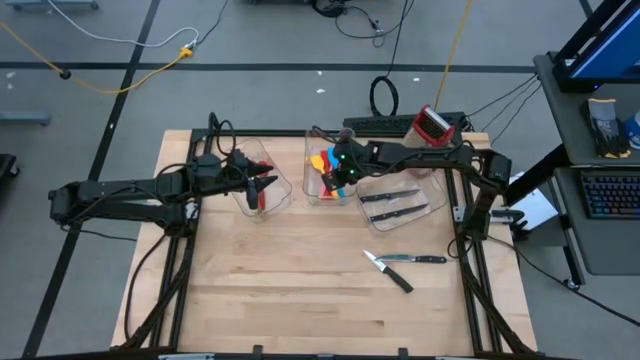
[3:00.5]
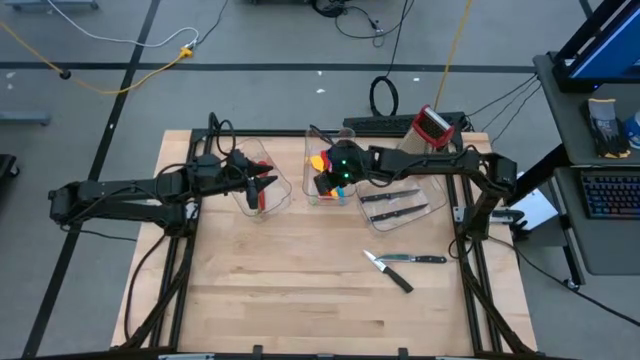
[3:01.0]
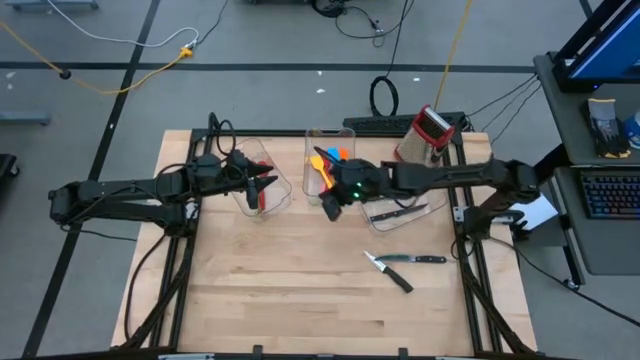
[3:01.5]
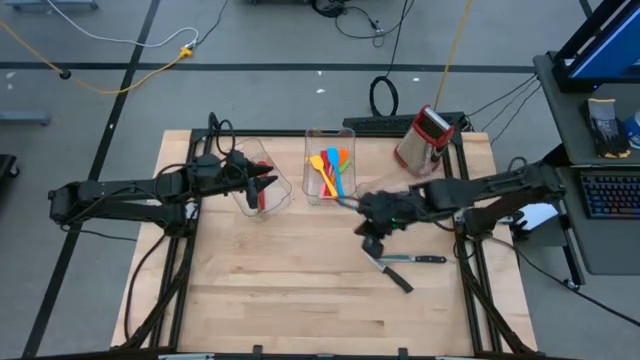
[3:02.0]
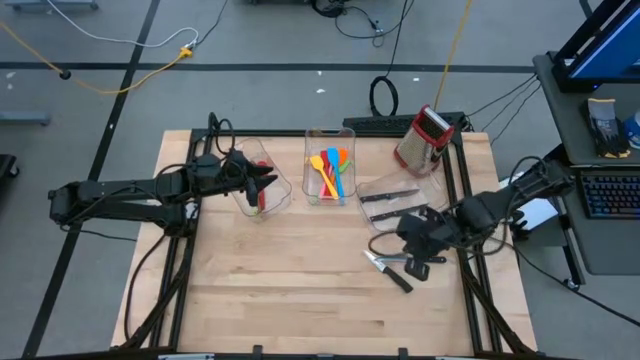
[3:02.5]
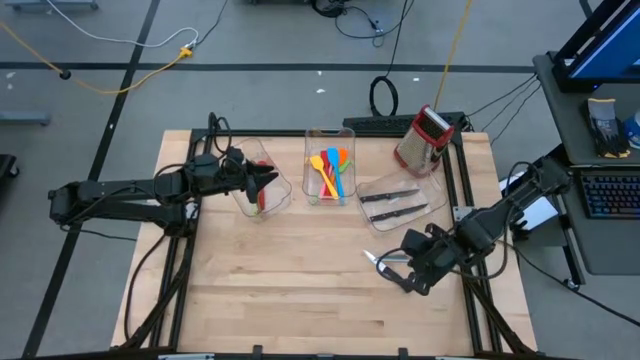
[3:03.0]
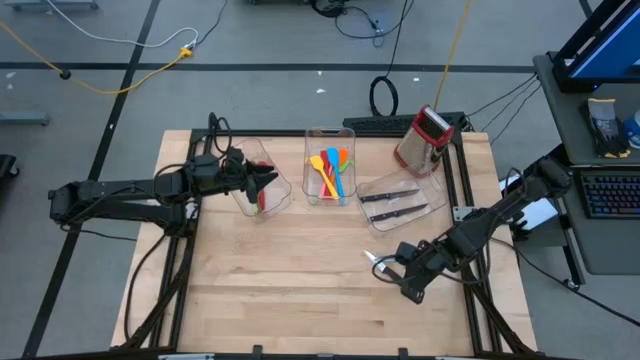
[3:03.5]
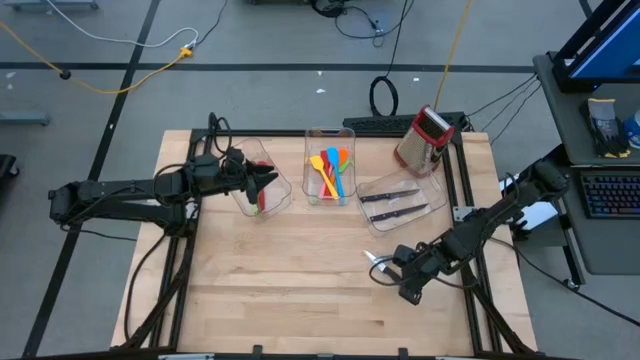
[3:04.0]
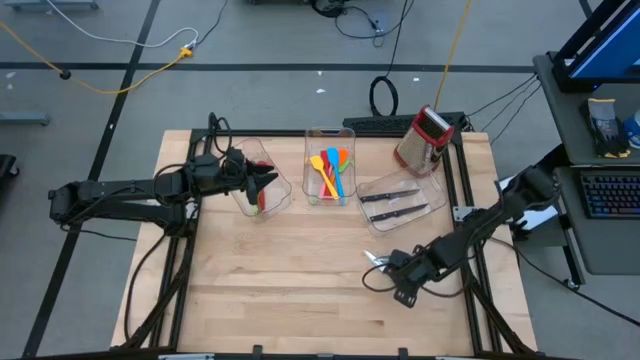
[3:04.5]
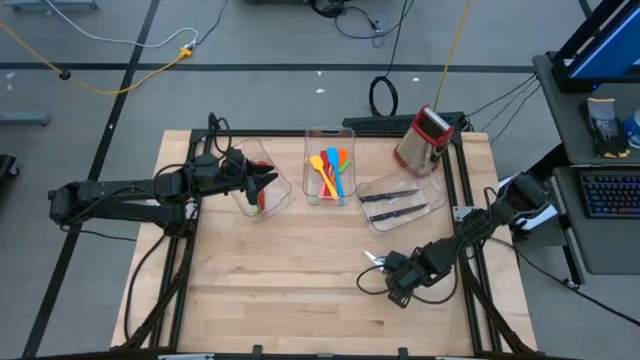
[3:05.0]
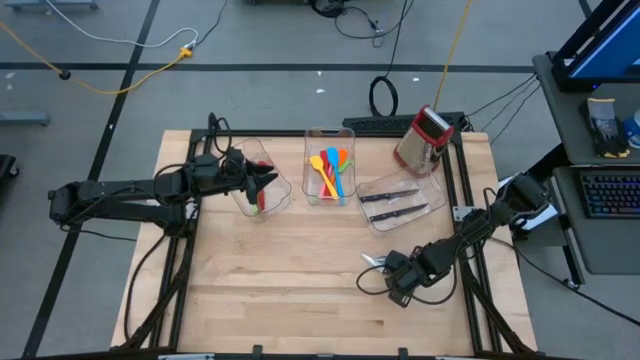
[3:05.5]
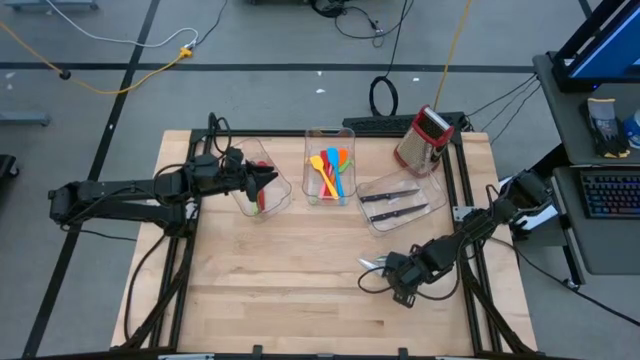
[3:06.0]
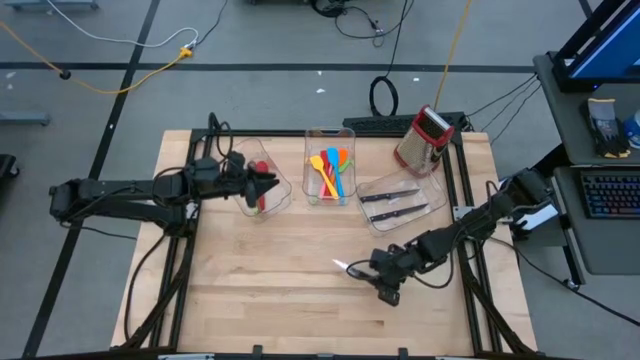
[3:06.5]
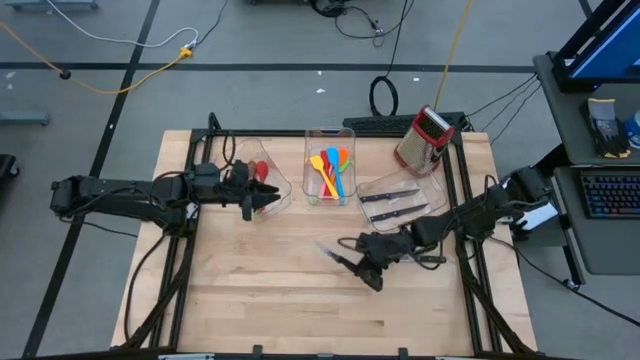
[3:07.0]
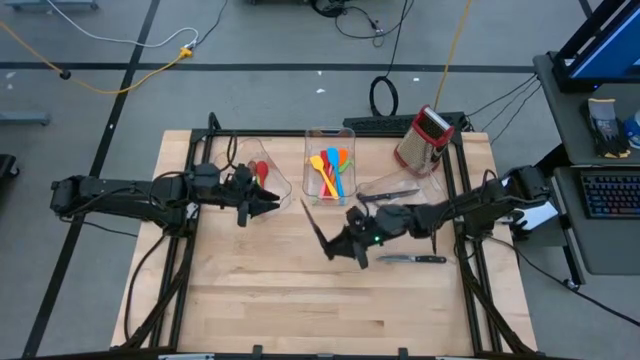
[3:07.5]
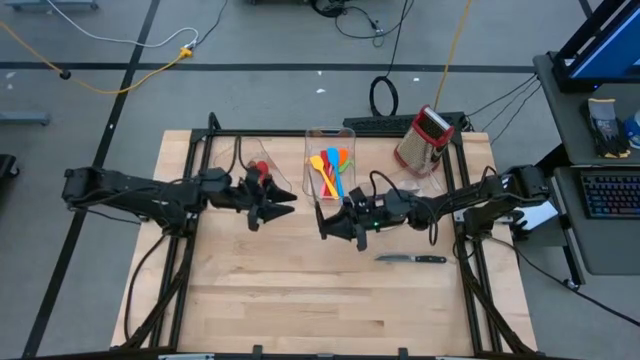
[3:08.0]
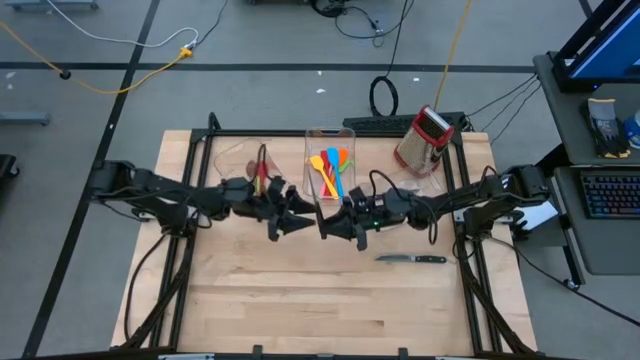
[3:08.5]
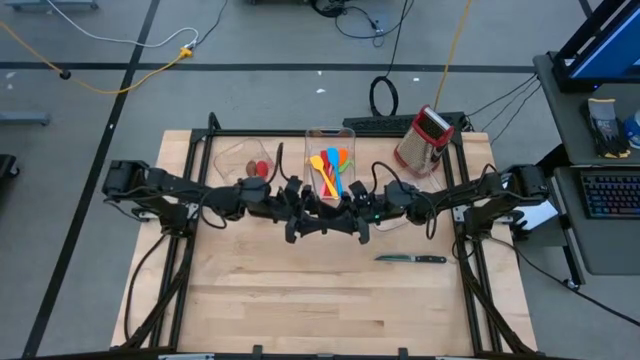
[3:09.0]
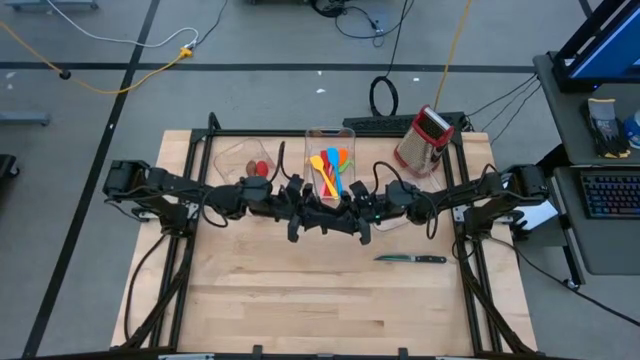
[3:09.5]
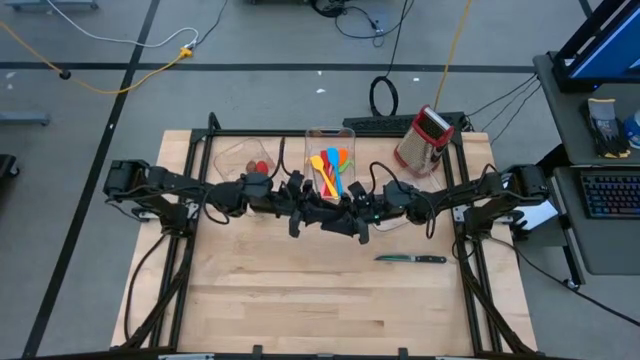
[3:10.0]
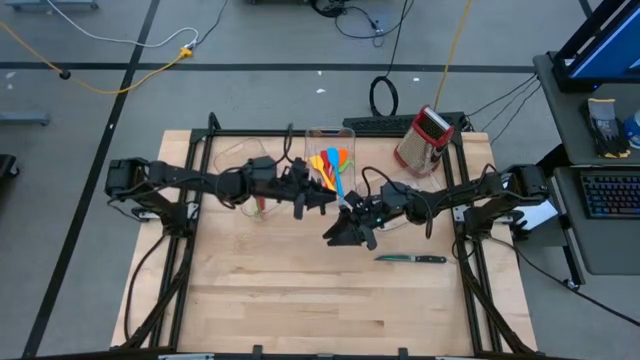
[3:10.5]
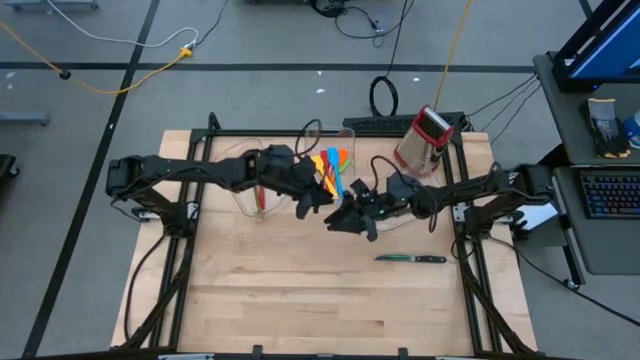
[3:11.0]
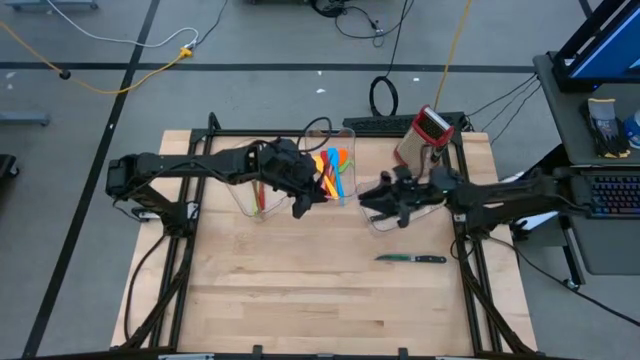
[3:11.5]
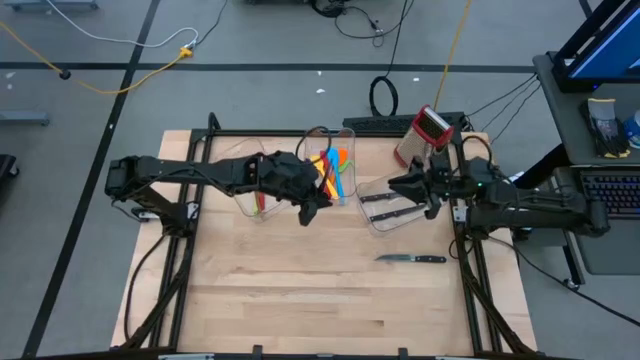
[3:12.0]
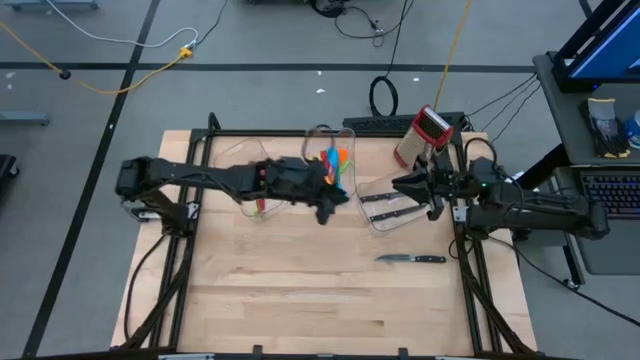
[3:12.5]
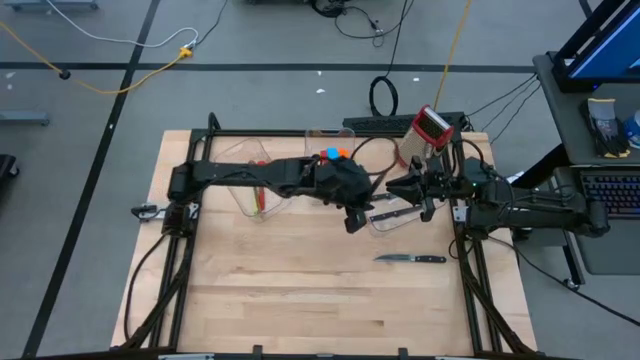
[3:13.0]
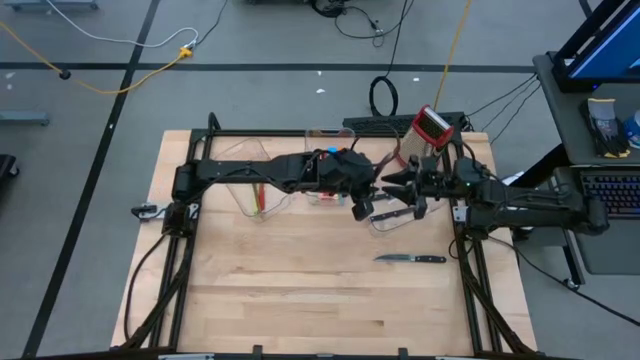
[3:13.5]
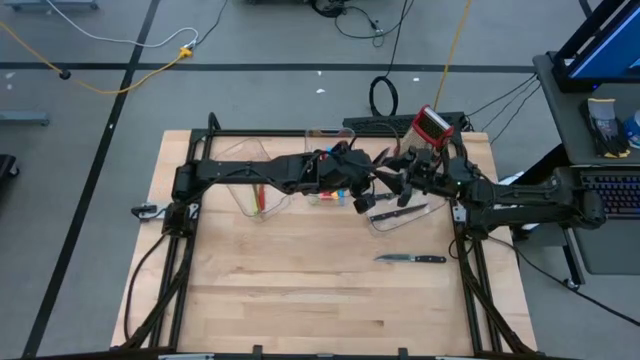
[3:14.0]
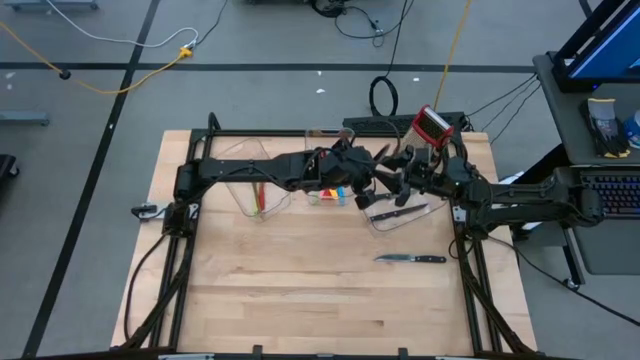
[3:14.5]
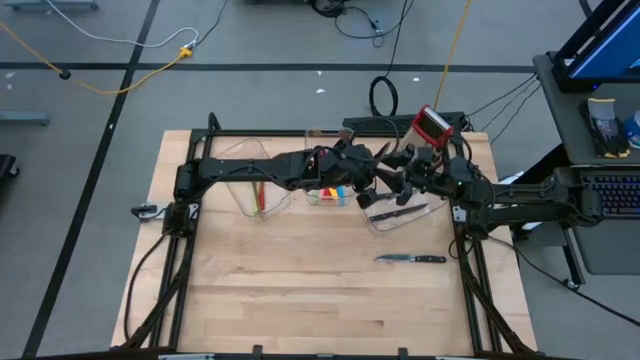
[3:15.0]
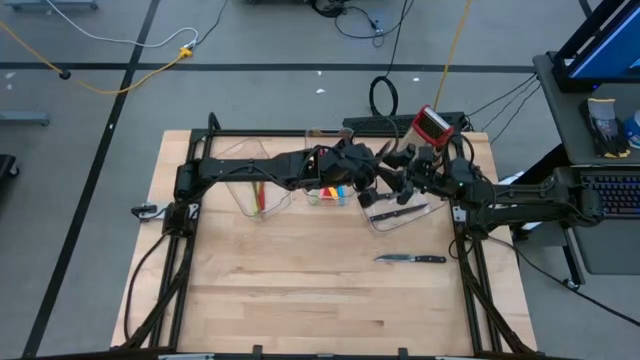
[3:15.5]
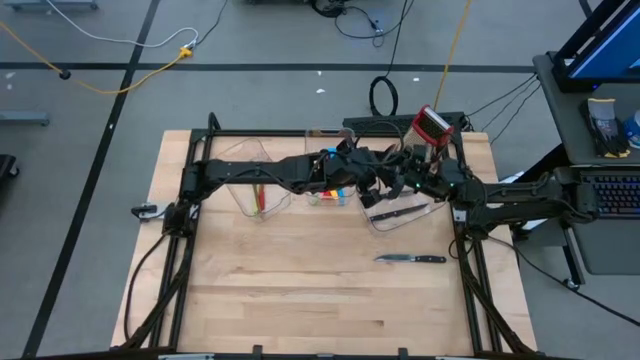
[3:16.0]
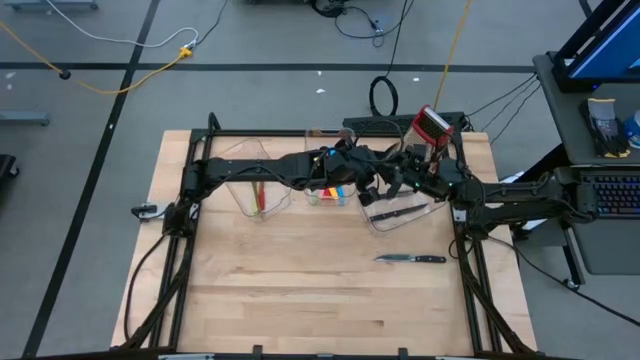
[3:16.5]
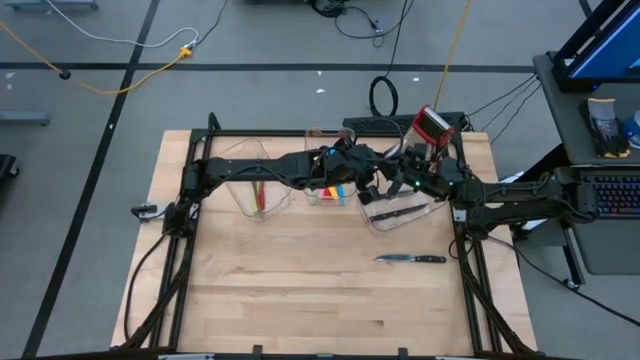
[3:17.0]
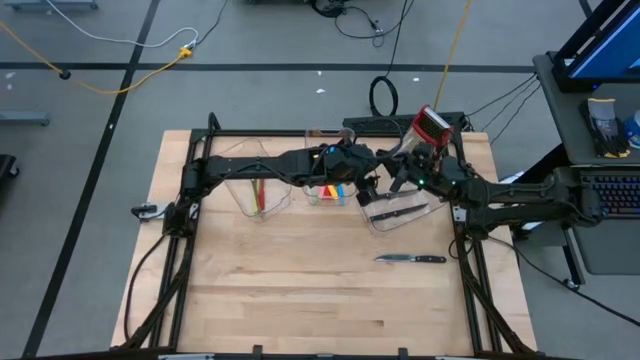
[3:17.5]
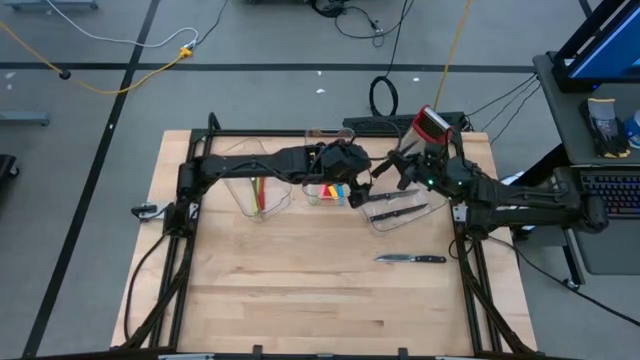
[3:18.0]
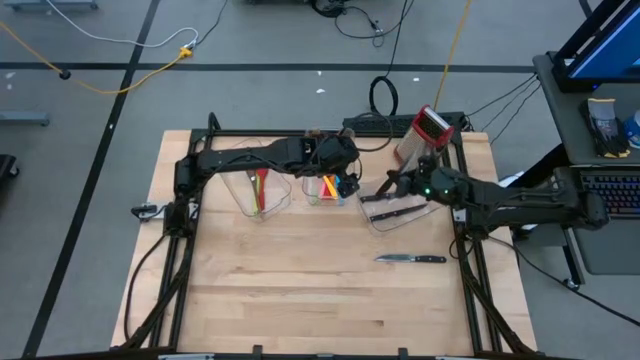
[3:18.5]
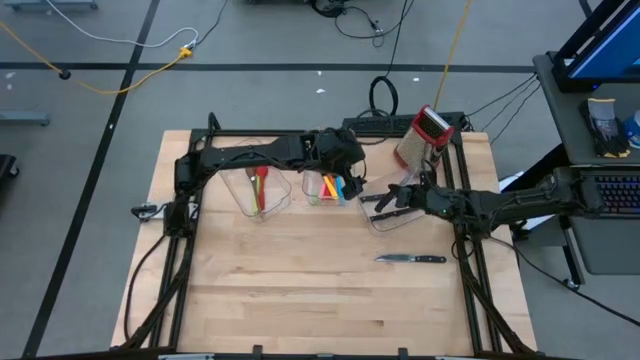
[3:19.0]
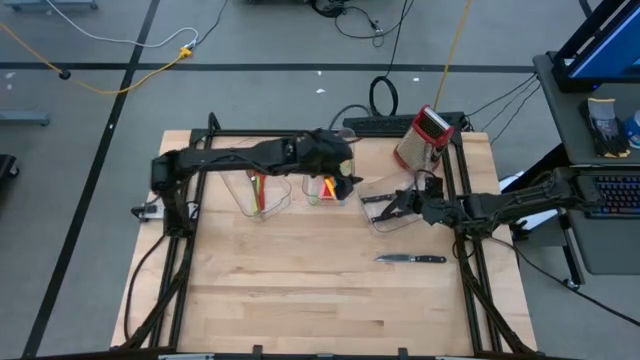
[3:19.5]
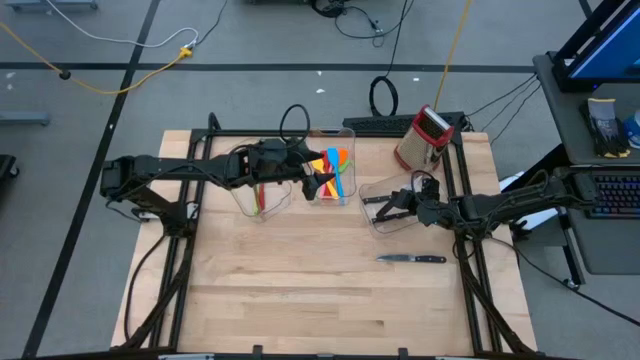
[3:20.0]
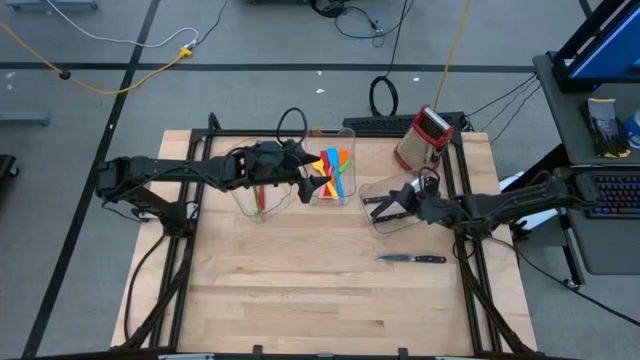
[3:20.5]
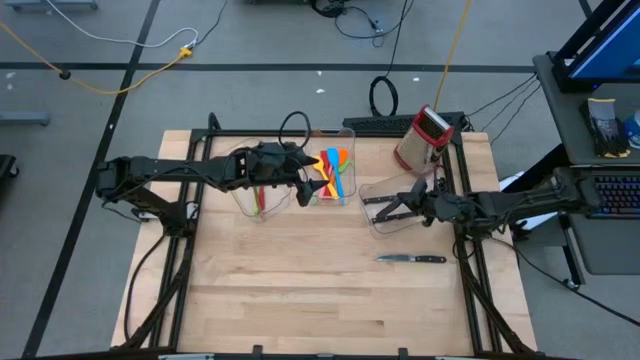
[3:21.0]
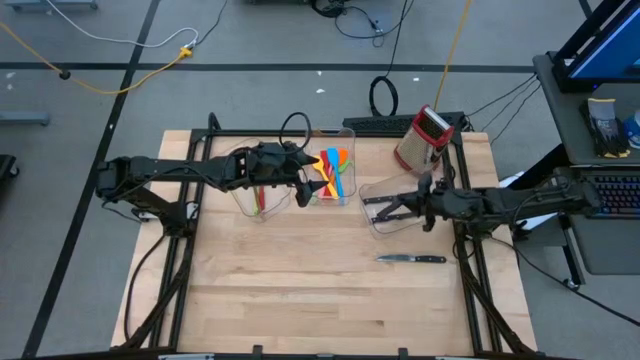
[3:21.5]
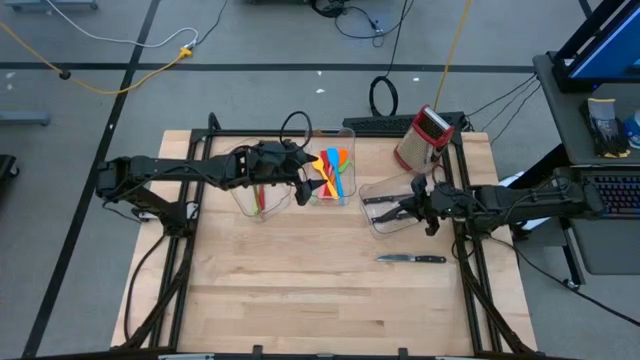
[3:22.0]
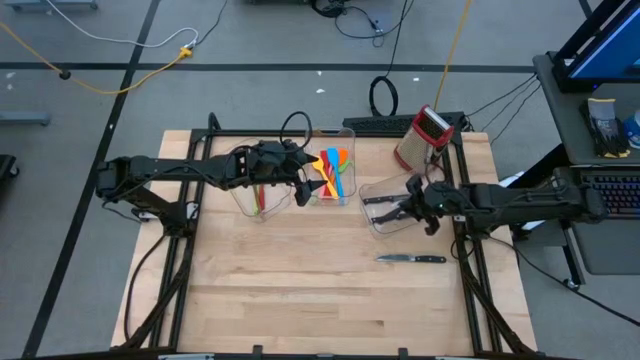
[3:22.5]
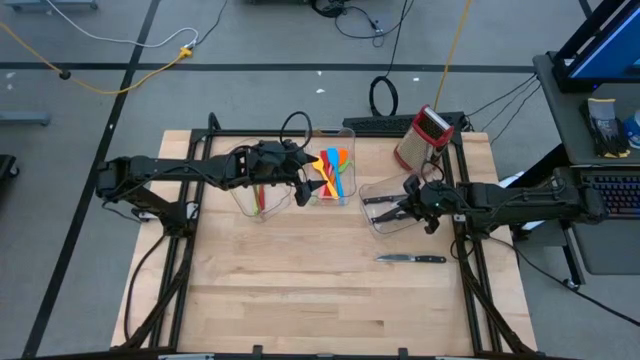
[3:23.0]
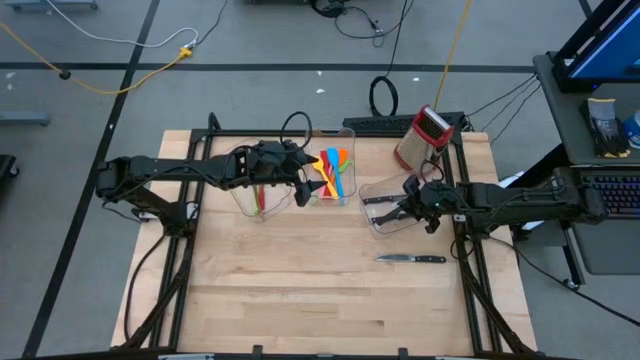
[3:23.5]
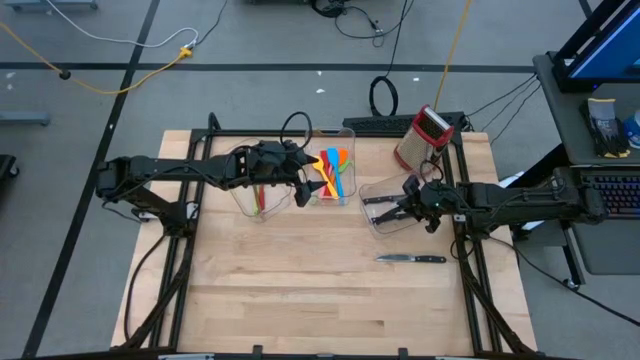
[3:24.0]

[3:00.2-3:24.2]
Task: Pick & Place Kitchen Items
Put the black kitchen knife into the right bin
